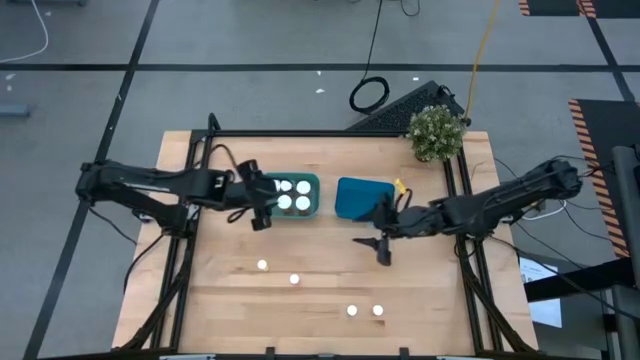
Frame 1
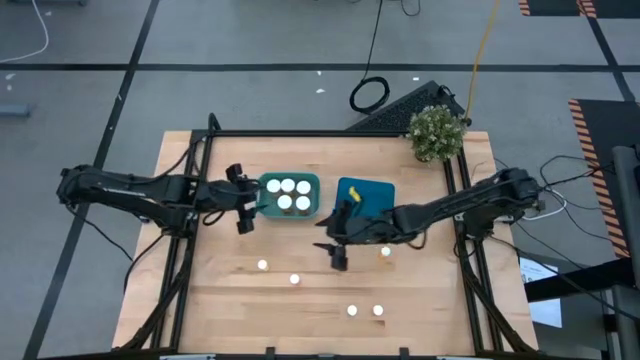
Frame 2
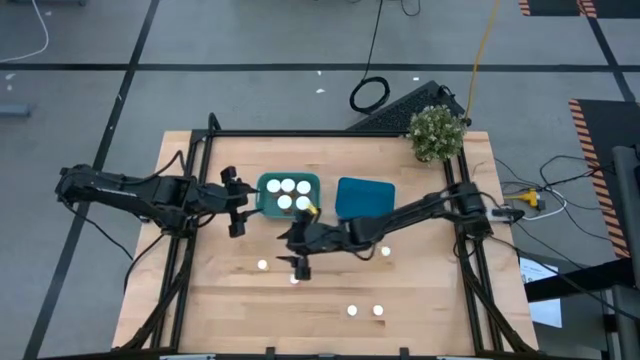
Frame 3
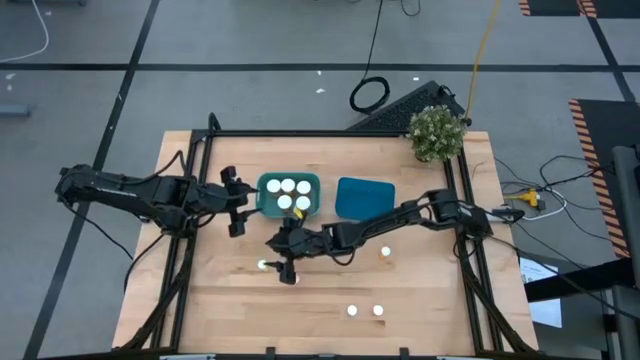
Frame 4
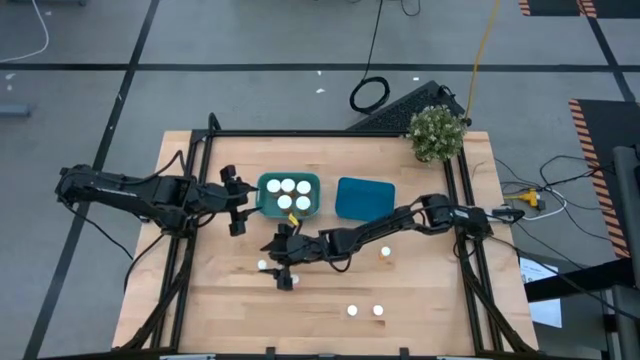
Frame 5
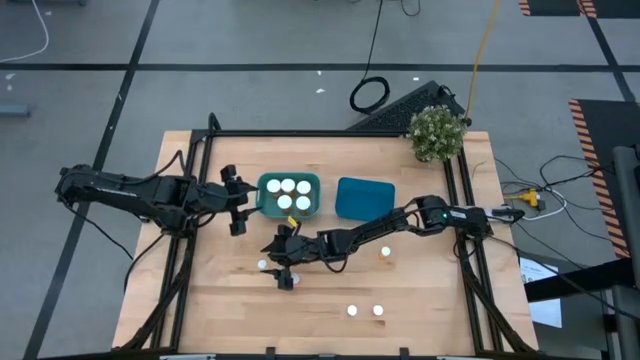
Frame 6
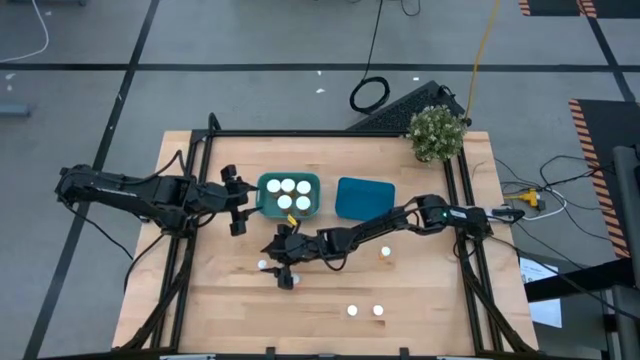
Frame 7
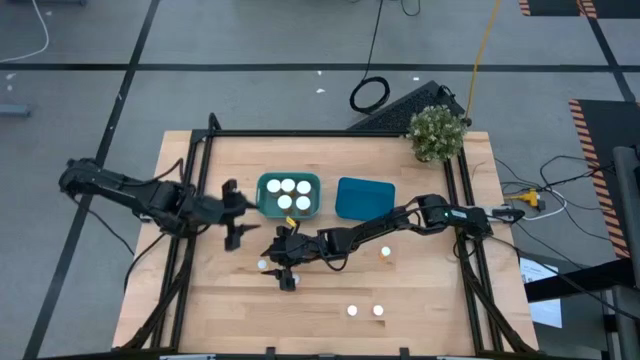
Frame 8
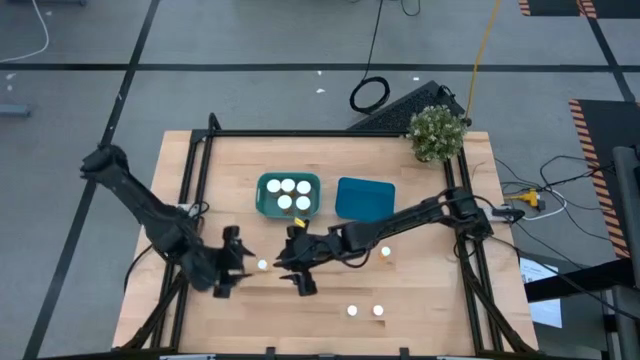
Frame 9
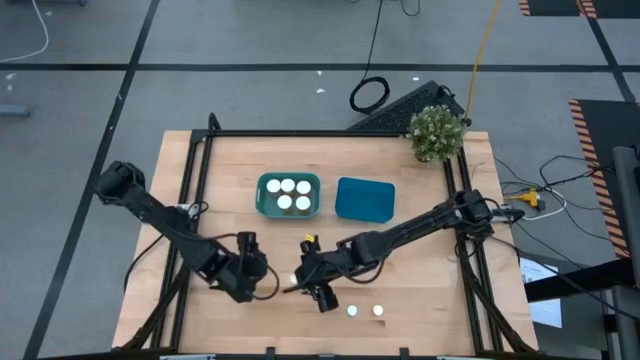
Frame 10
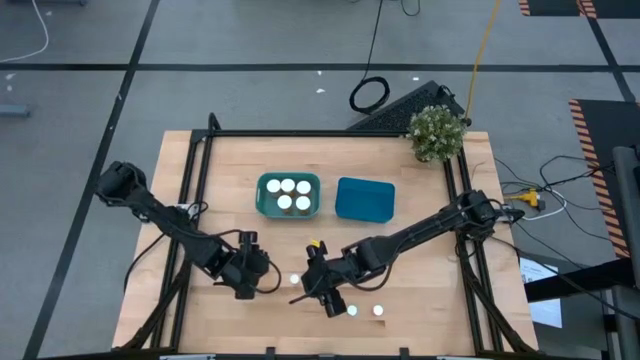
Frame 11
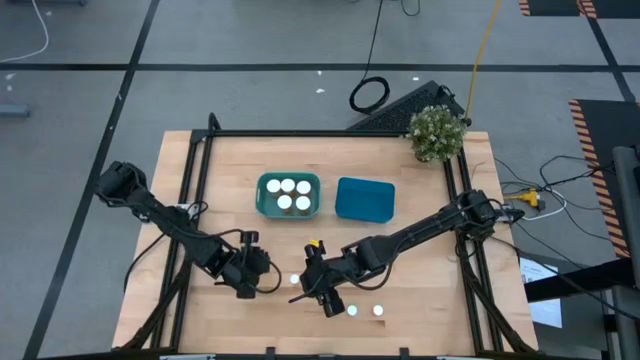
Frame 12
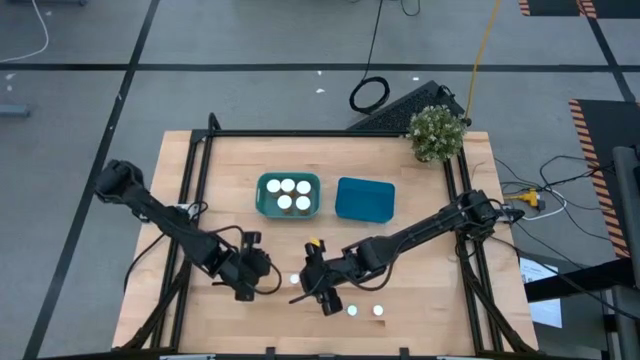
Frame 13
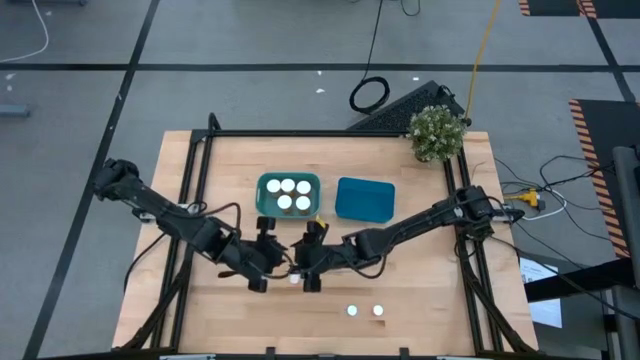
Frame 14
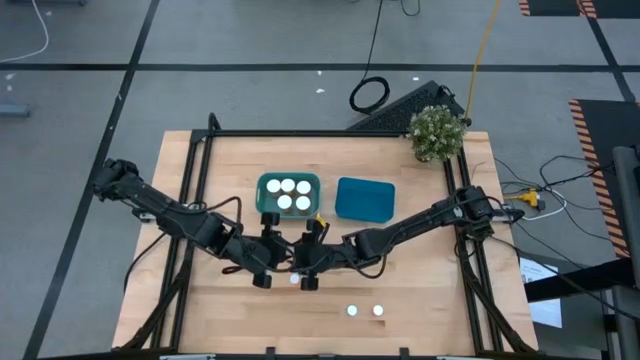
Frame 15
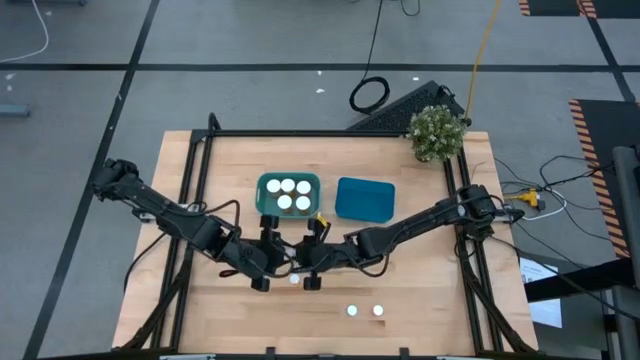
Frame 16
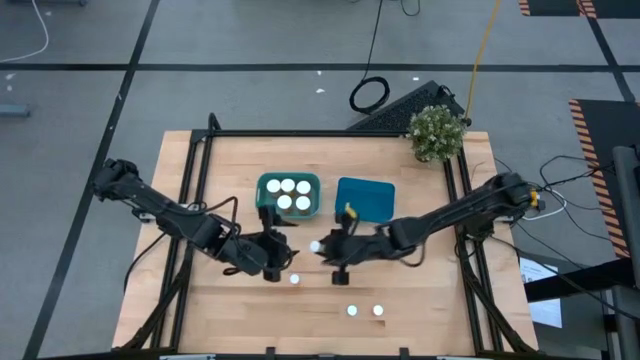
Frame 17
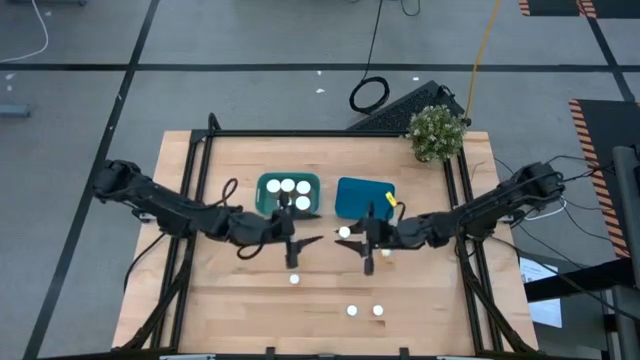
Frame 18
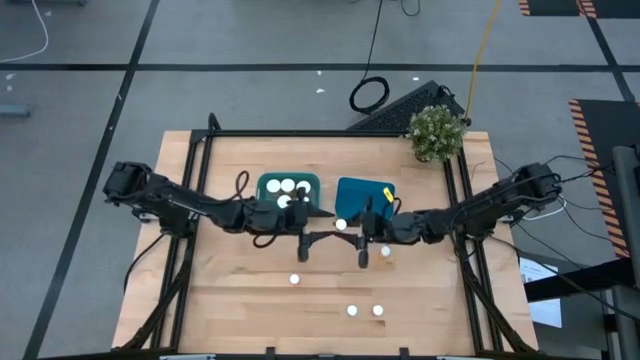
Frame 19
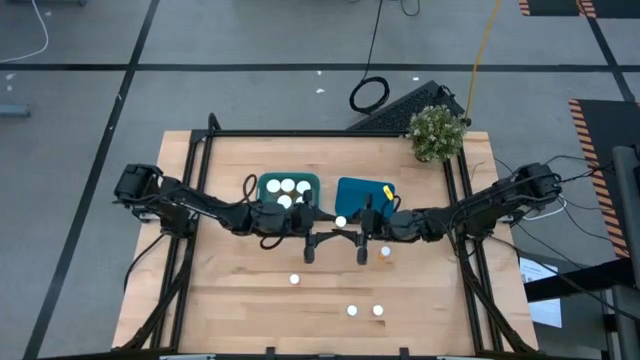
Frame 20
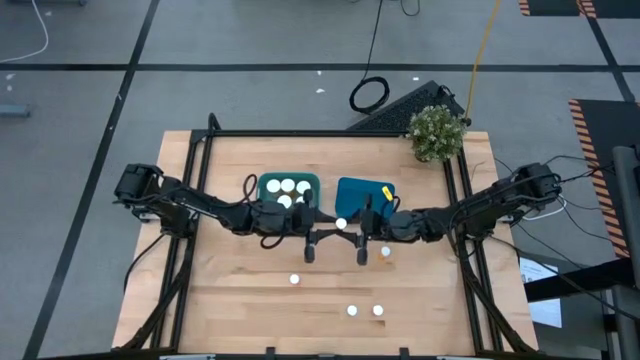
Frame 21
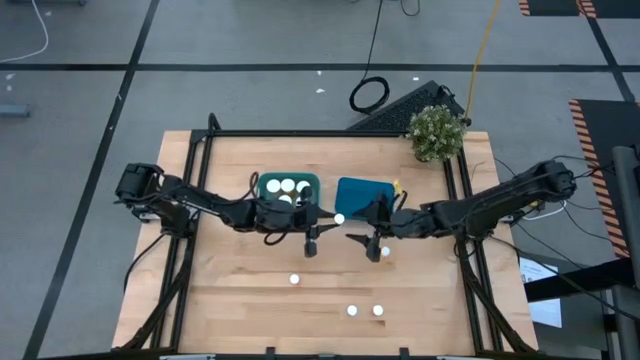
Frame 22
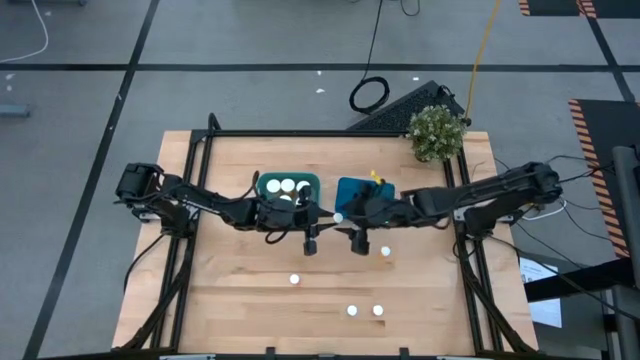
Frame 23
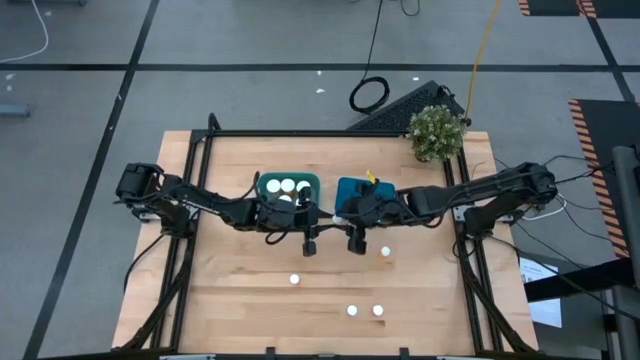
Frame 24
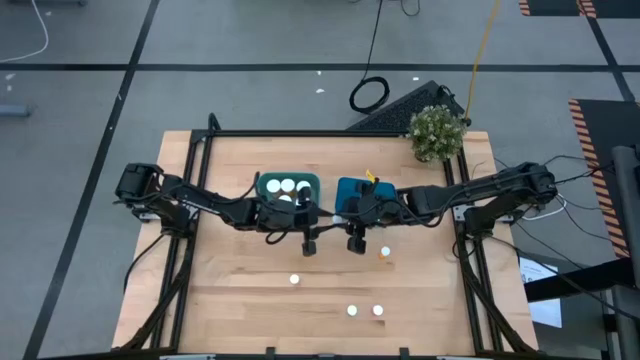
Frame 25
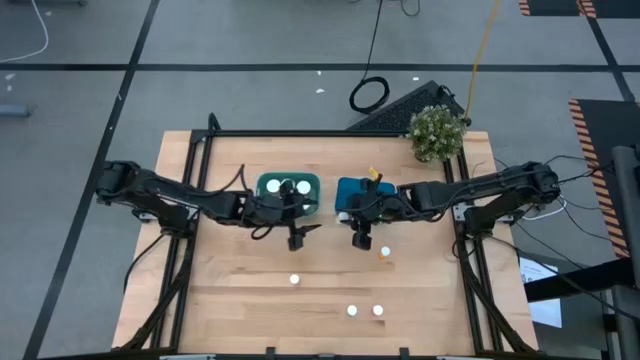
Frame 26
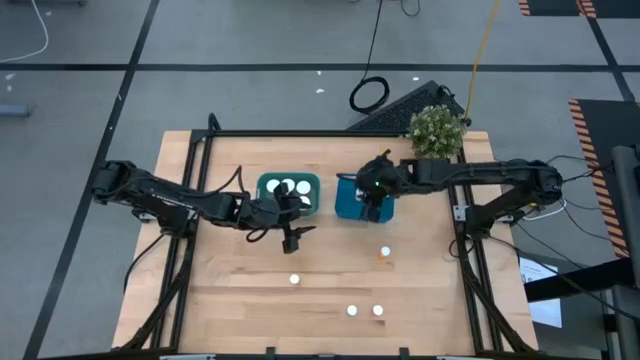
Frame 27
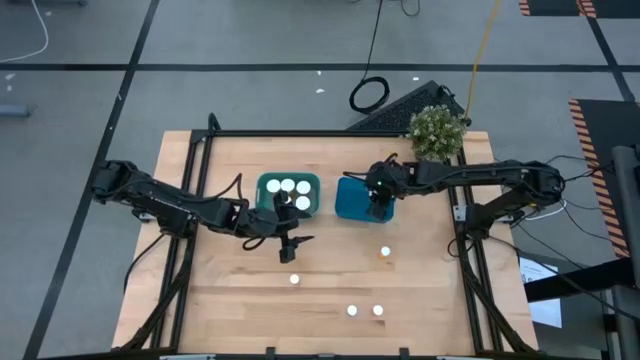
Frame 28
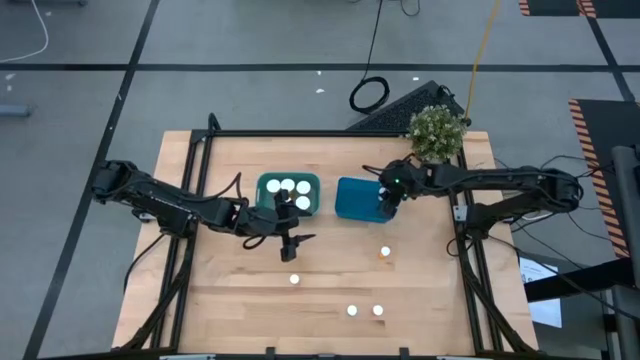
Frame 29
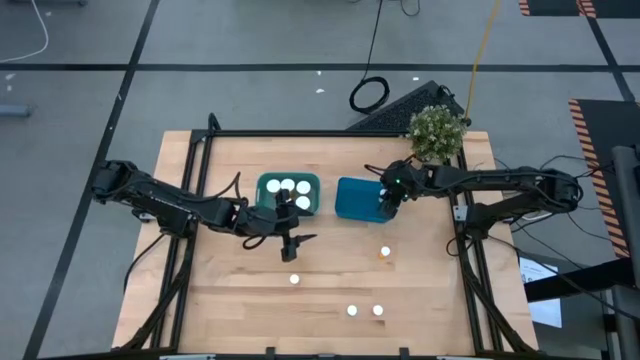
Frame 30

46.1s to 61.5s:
Task: Pick and place medicine bottles into bin by pill shape (circle, oval)
Put the small yellow tablet bottle into the blue bin

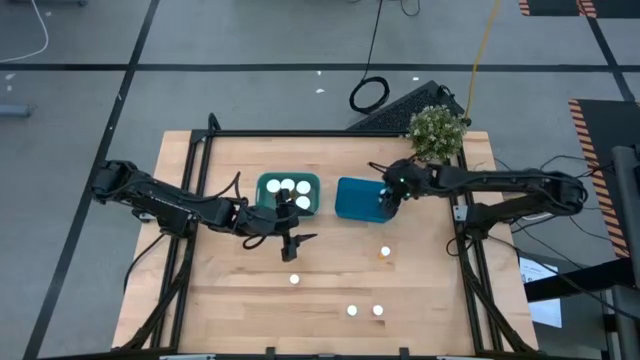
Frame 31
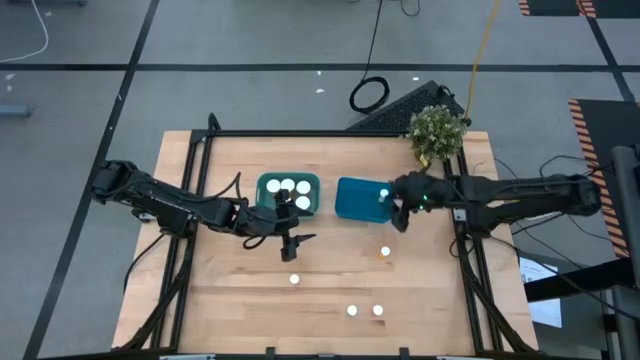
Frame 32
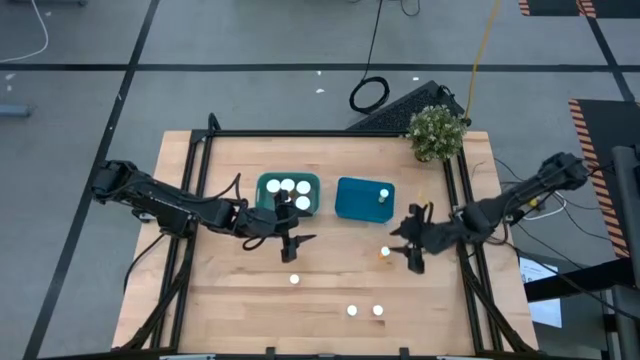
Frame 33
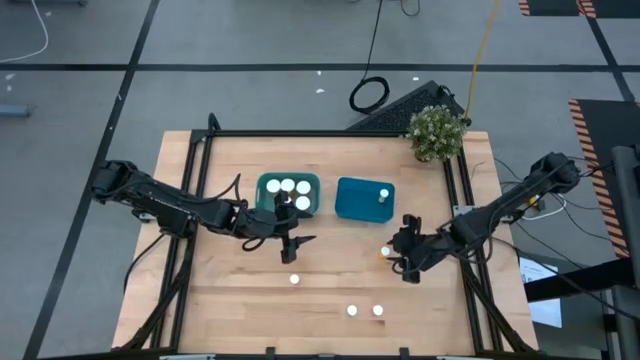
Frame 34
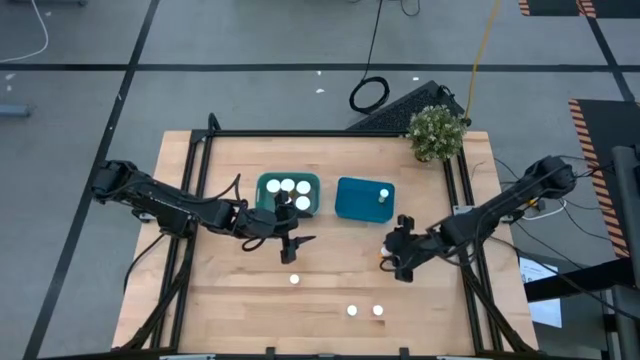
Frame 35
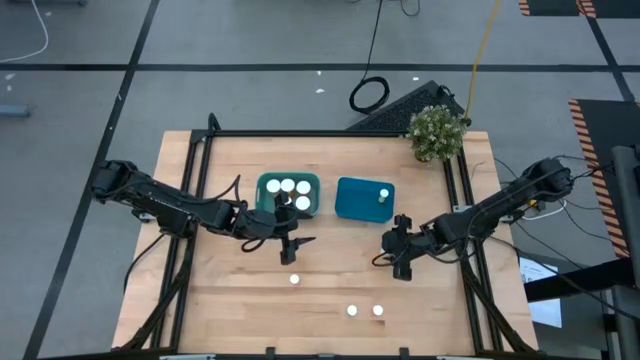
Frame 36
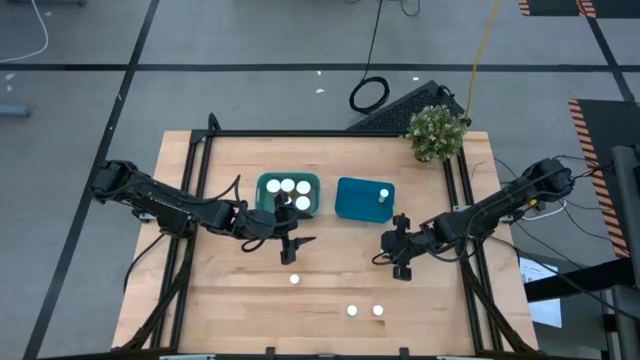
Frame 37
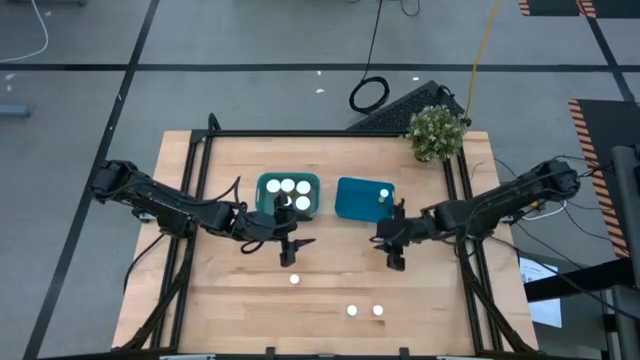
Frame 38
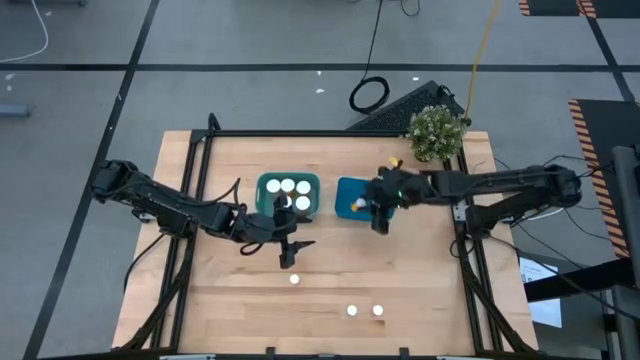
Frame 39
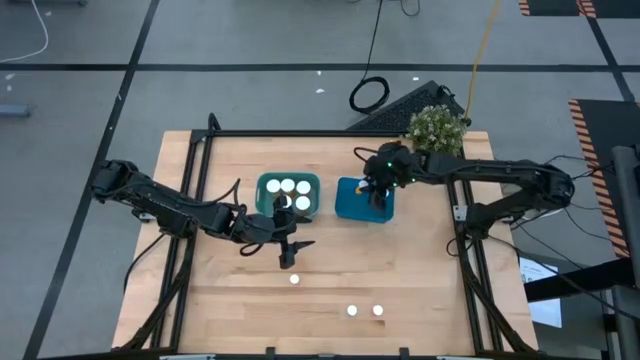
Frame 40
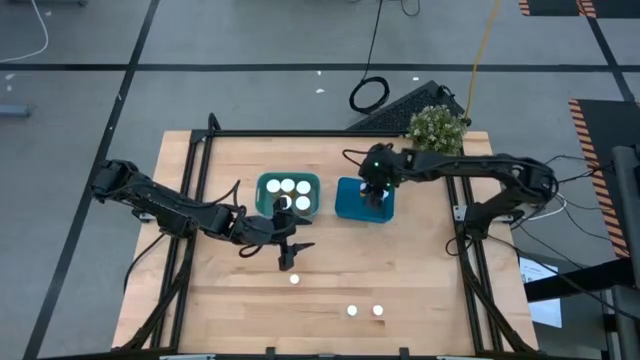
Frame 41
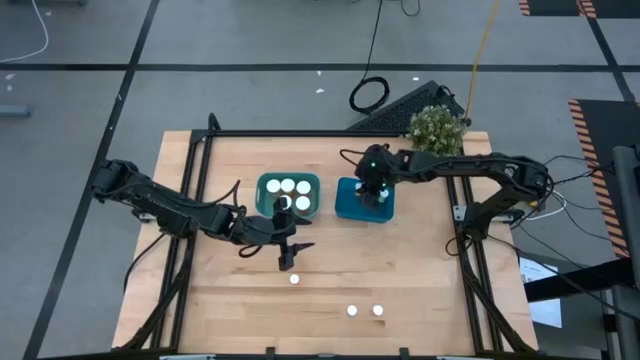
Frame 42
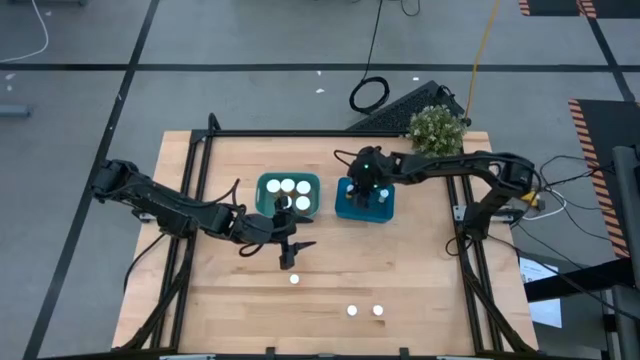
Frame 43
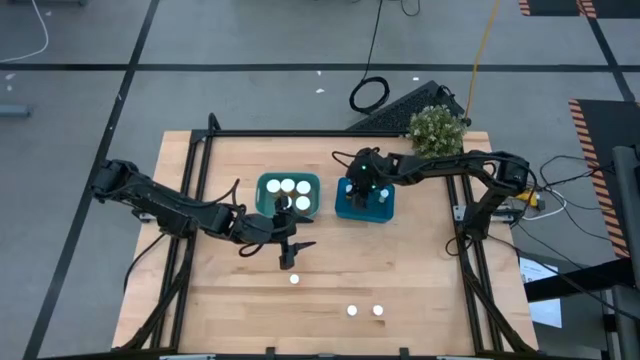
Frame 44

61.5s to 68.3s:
Put the small orange tablet bottle into the blue bin
